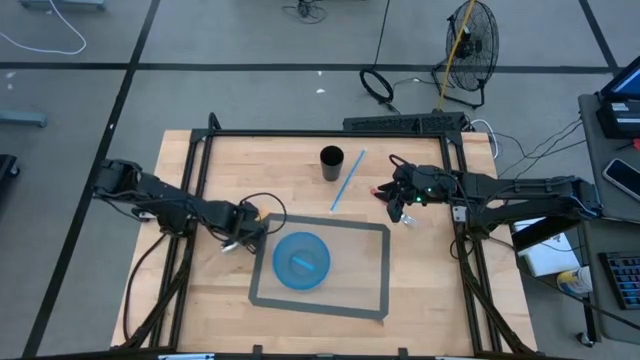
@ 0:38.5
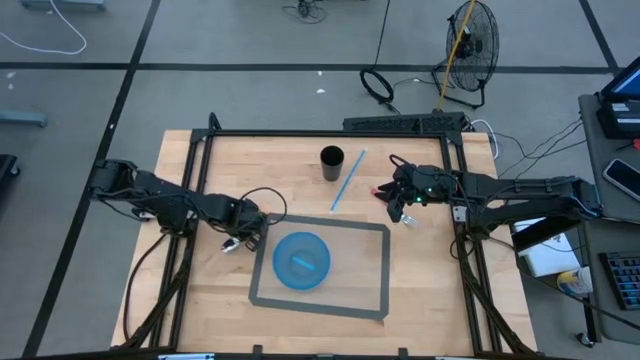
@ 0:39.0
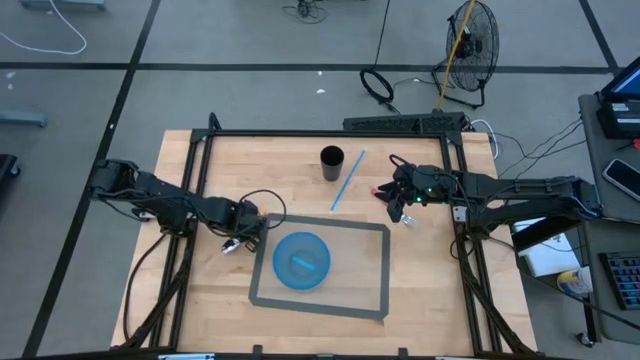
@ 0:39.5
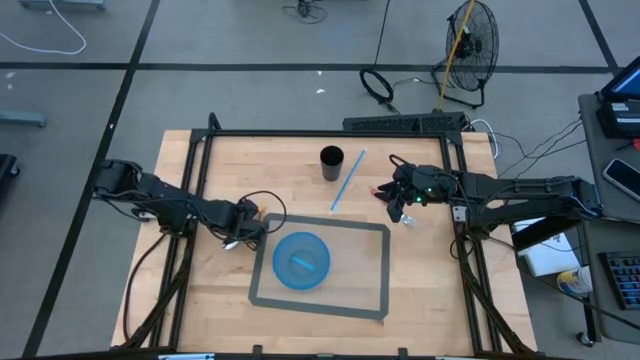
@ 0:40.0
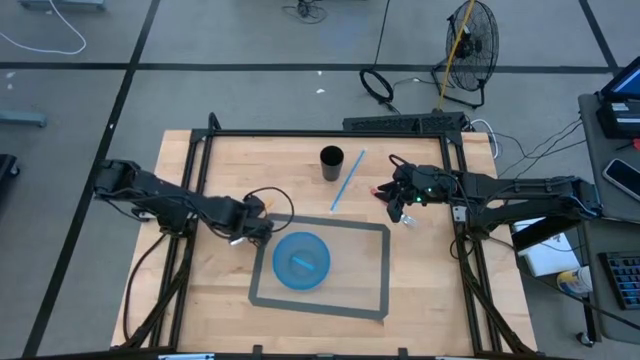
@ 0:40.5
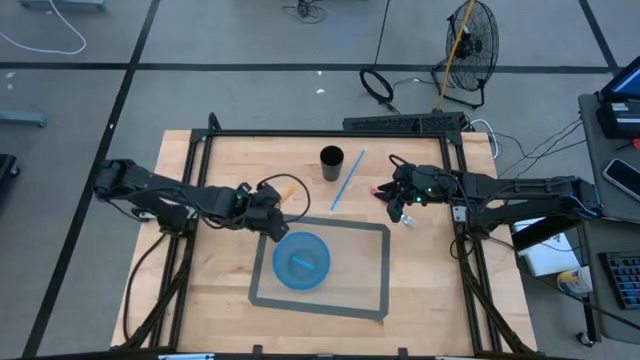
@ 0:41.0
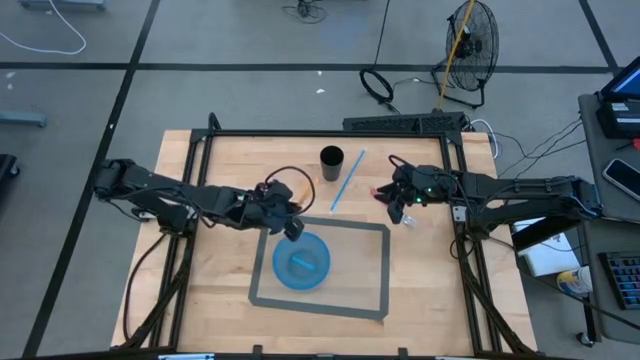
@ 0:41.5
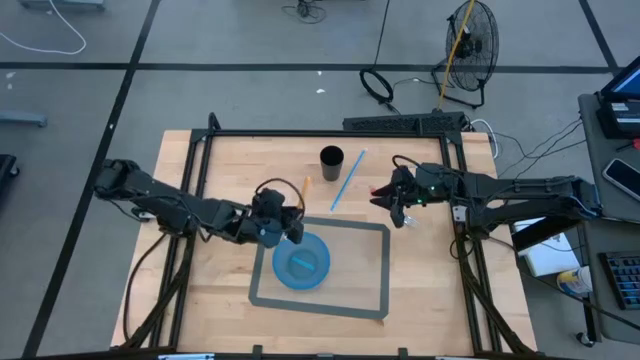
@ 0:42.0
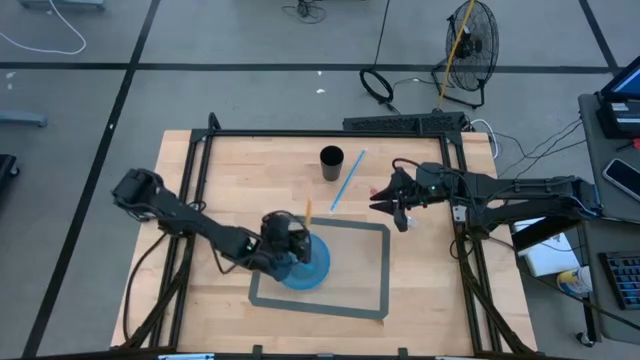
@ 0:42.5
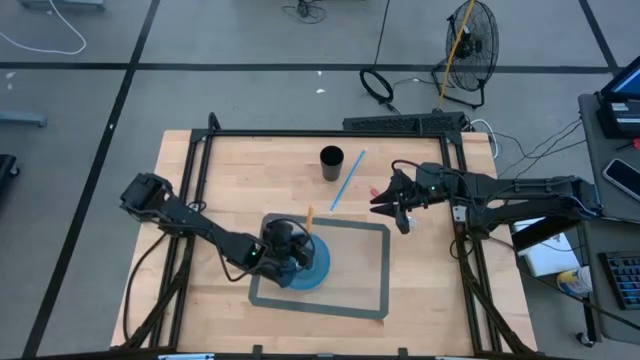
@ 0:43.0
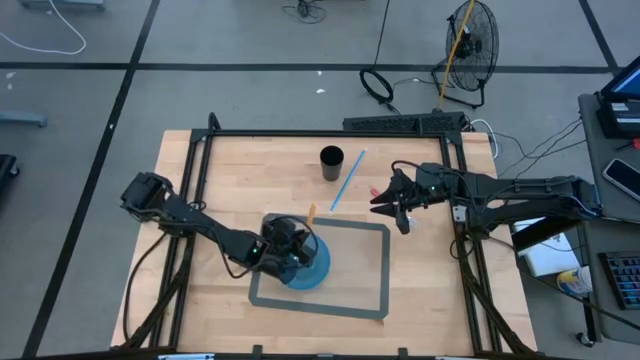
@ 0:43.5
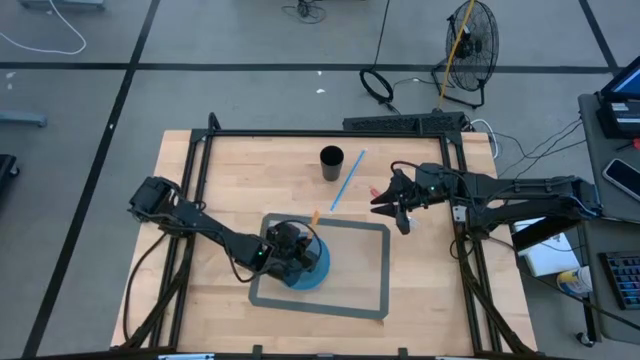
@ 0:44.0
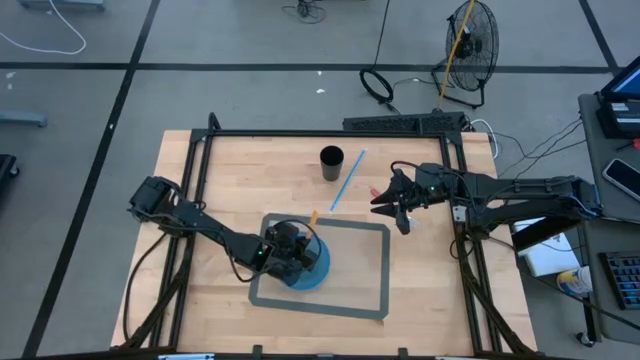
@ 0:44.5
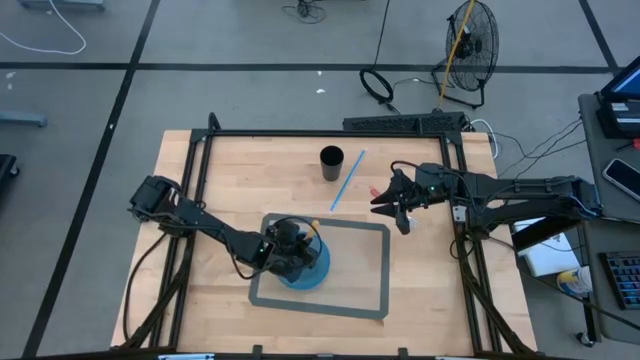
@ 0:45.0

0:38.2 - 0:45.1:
Task: Pick & Place Utensil
Put the yellow spoon into the blue bowl

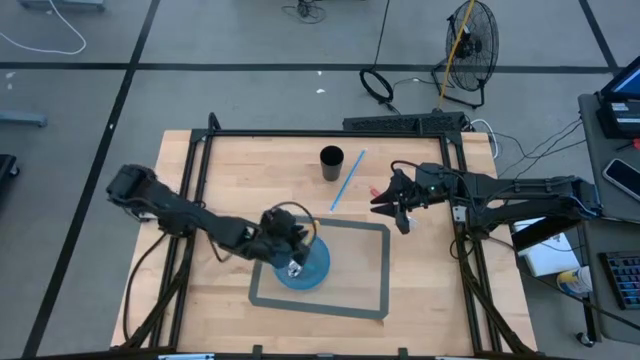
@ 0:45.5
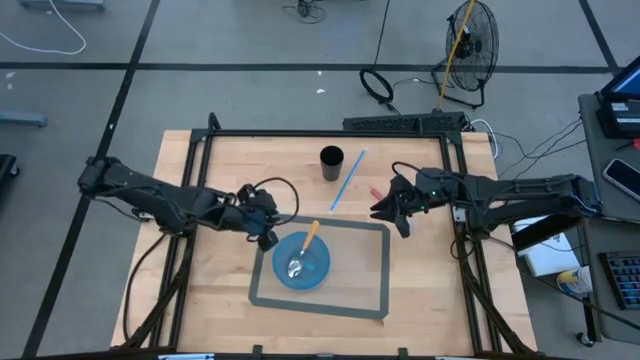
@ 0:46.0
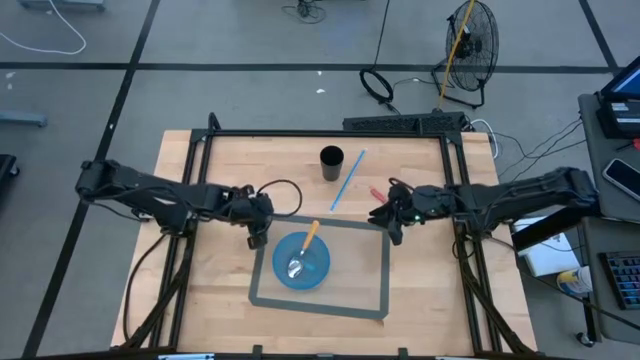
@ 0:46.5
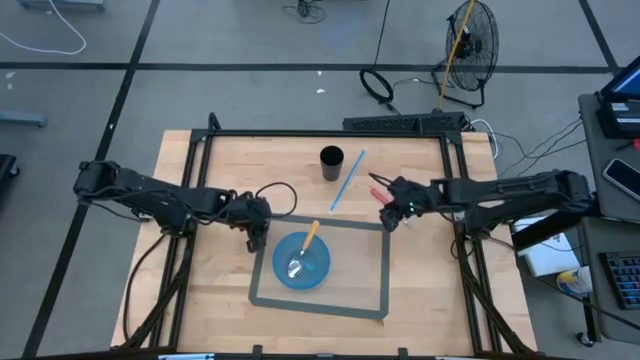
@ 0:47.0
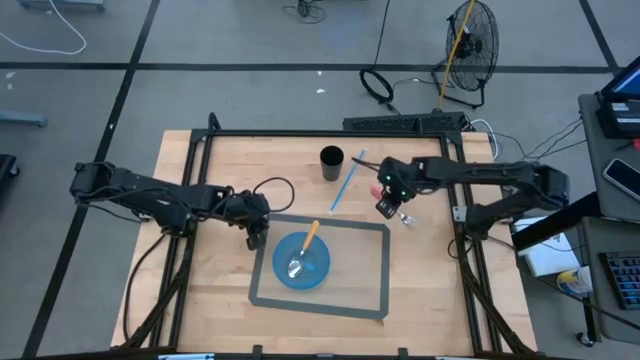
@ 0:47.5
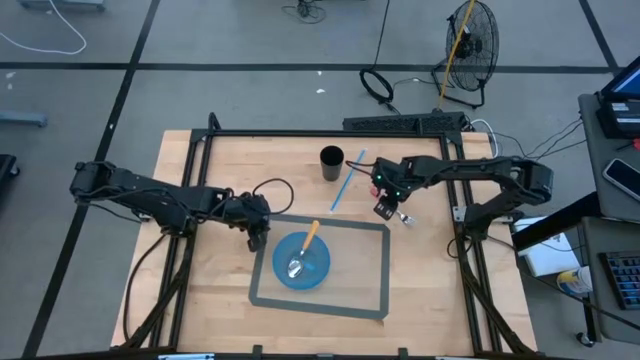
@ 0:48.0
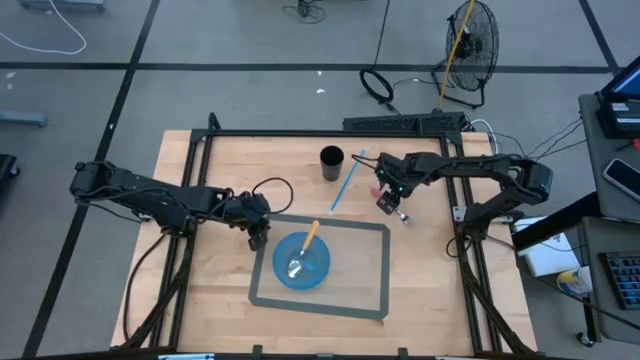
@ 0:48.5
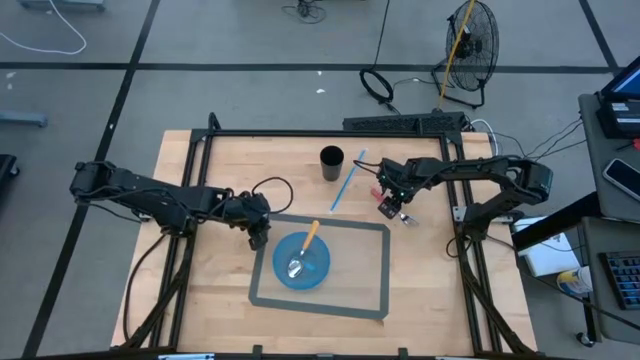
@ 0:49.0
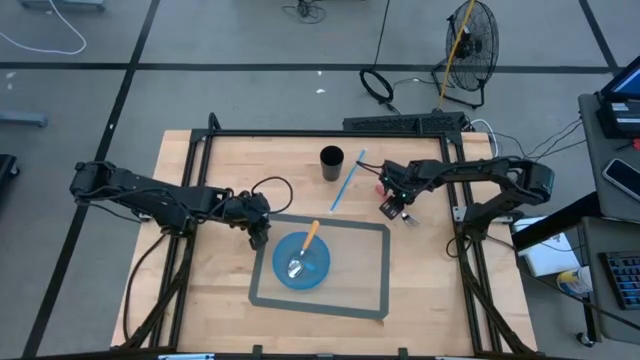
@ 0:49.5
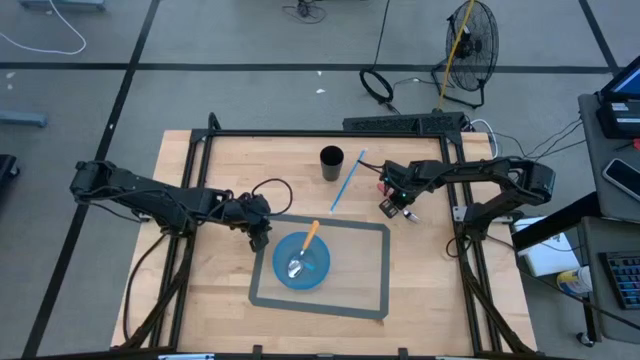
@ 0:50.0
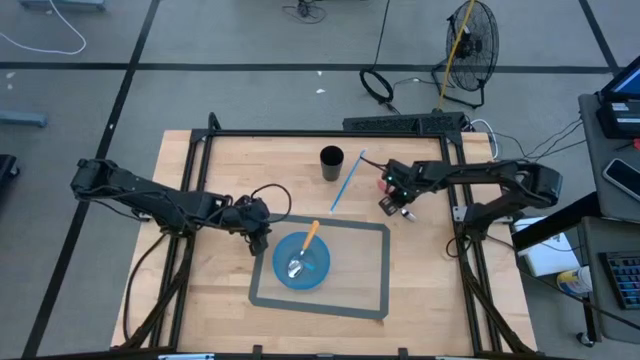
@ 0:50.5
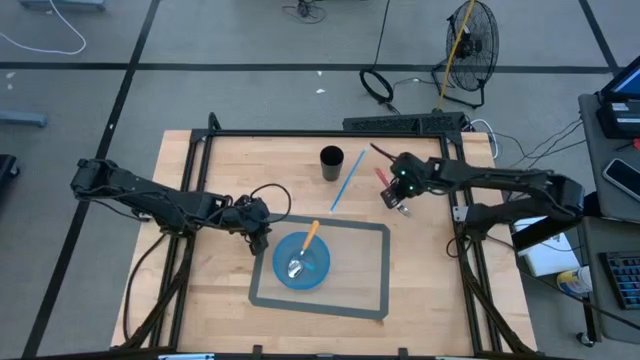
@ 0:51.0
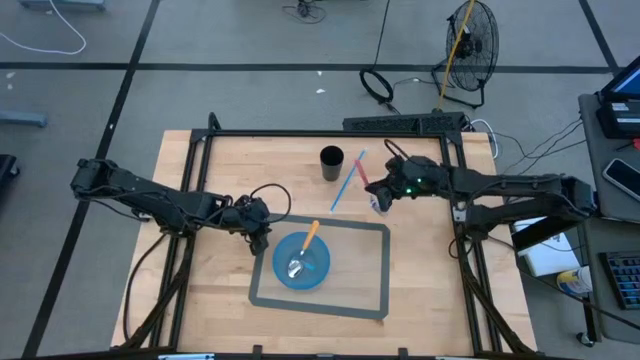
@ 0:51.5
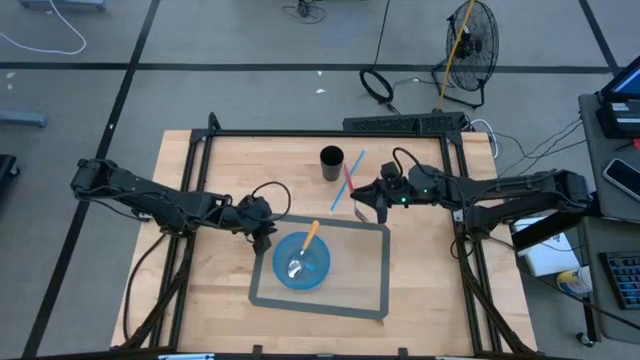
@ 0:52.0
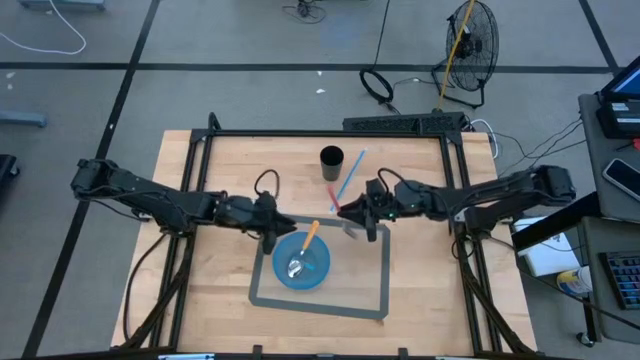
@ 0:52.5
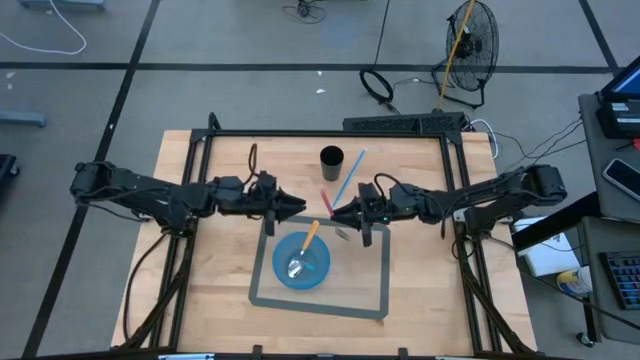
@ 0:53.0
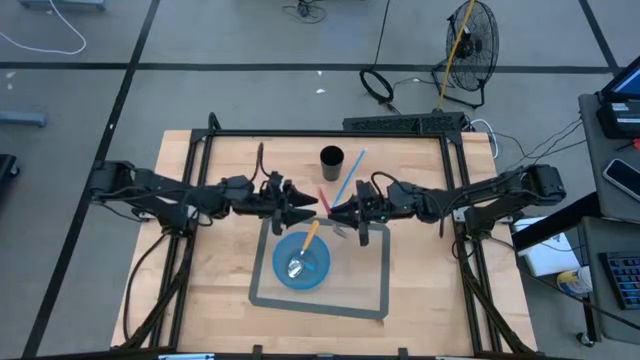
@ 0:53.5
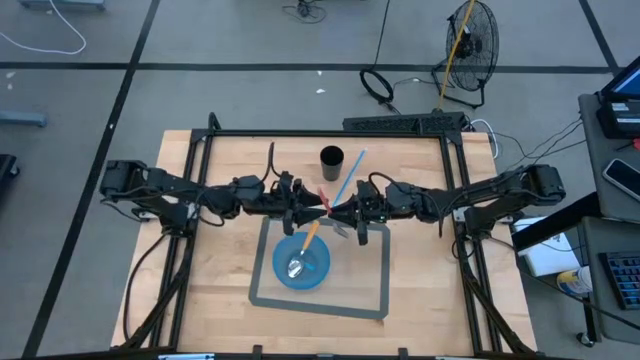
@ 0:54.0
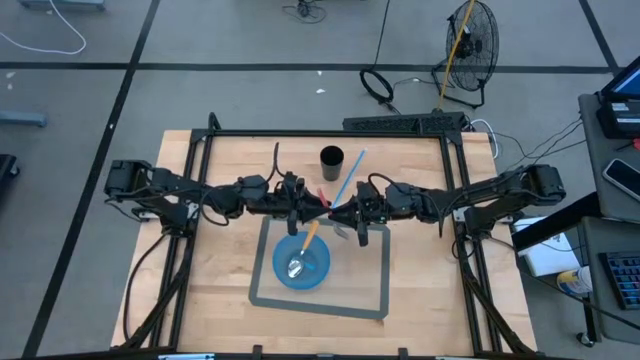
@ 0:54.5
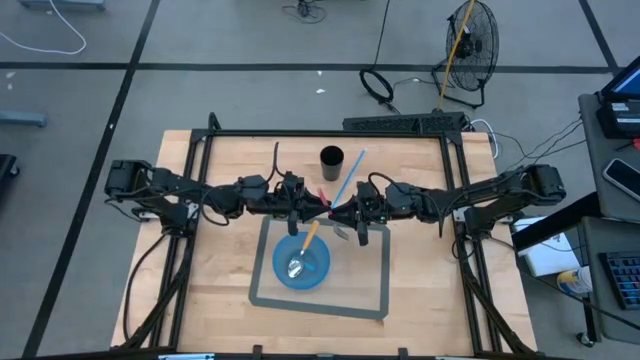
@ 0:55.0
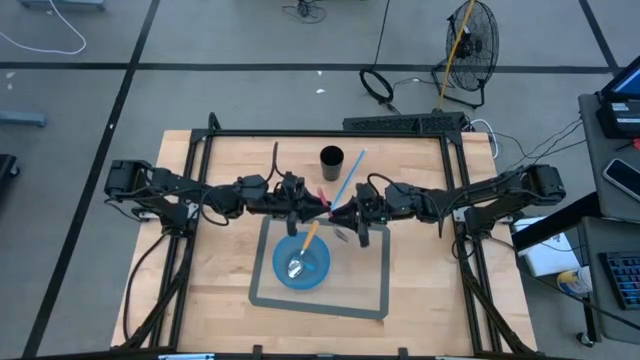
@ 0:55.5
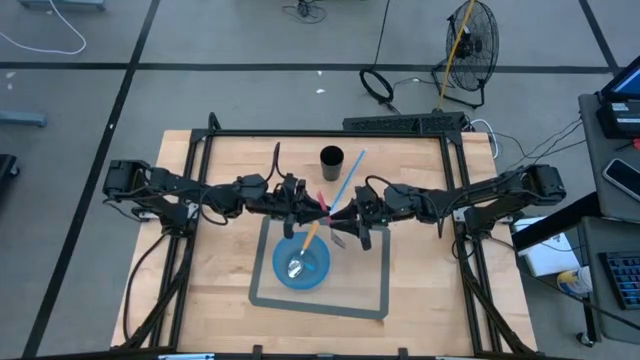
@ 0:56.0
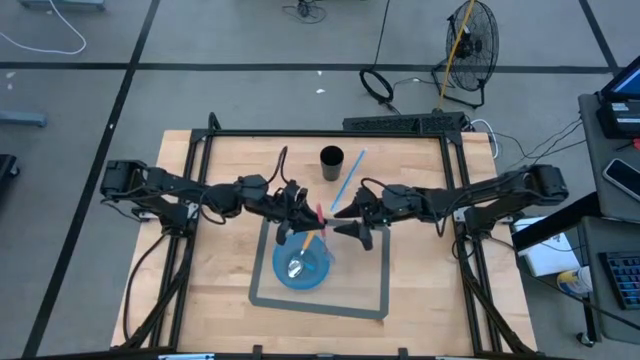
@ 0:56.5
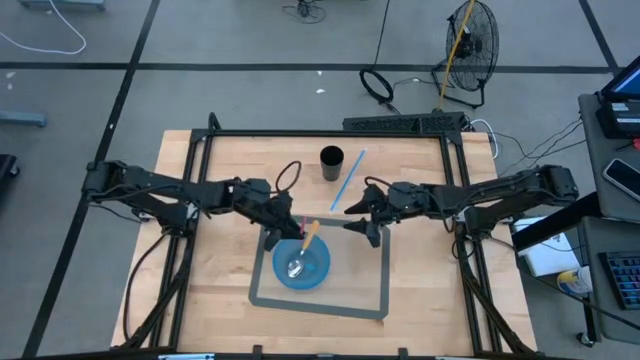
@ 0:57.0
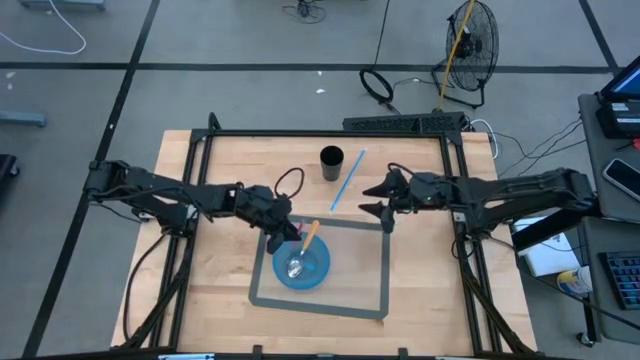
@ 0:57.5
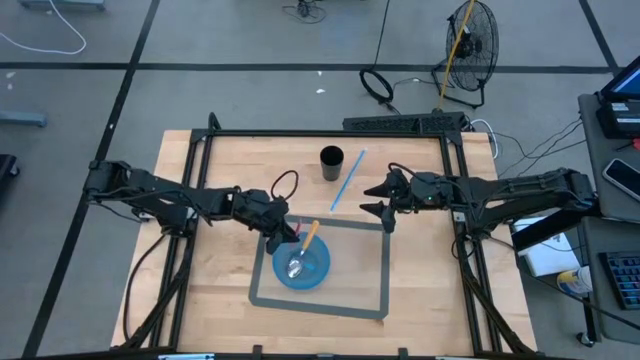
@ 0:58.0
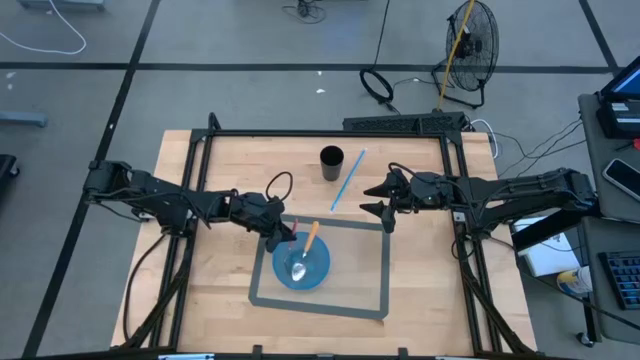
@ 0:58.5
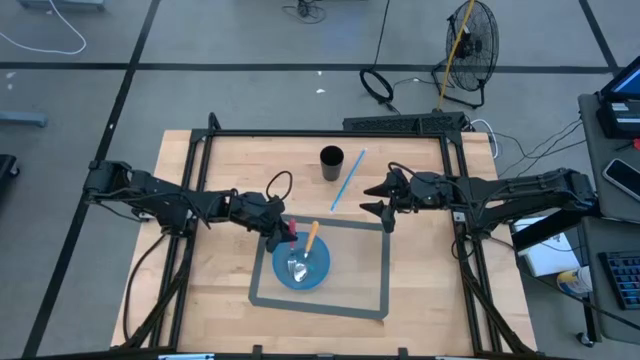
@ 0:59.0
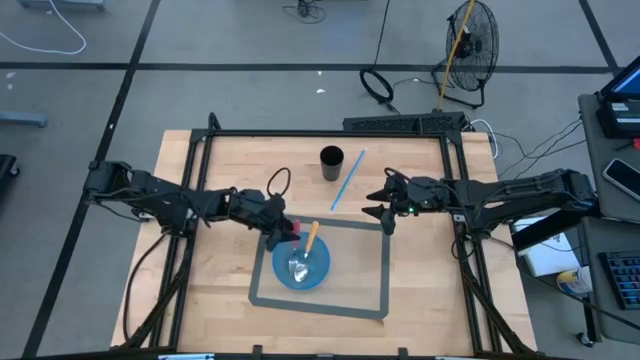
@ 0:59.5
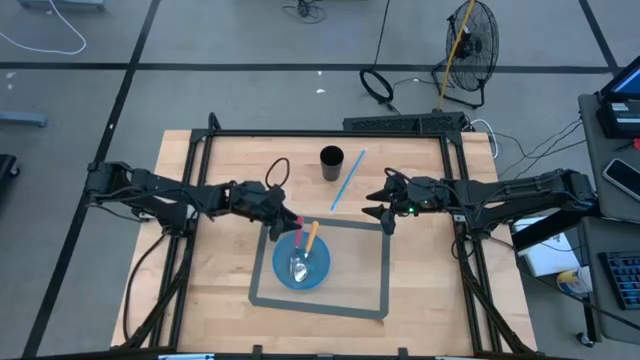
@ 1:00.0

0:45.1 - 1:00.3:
Put the pink fork into the blue bowl
